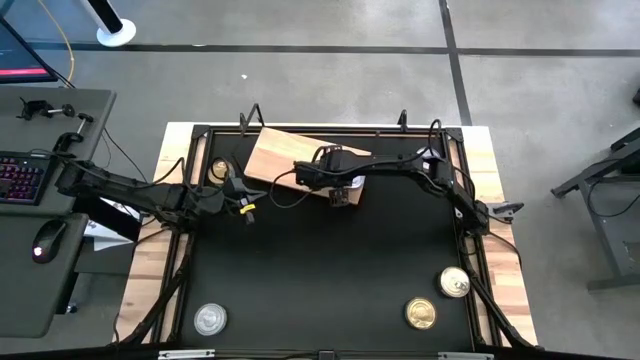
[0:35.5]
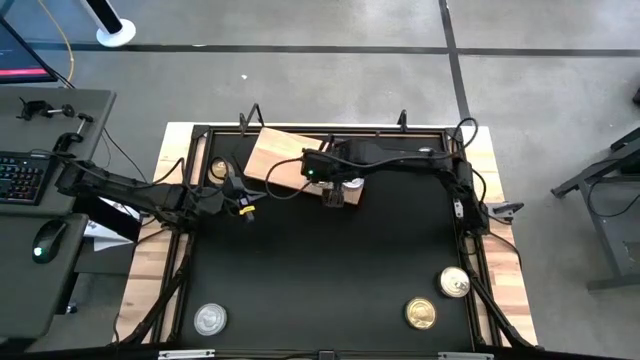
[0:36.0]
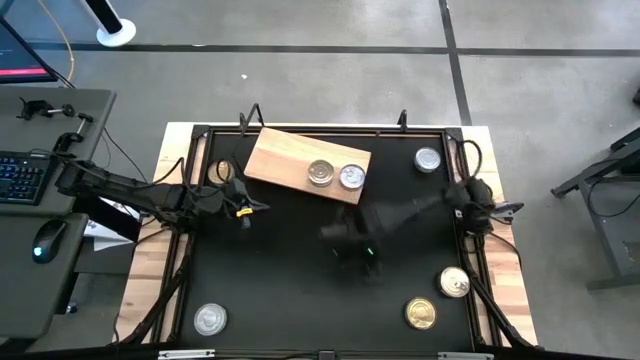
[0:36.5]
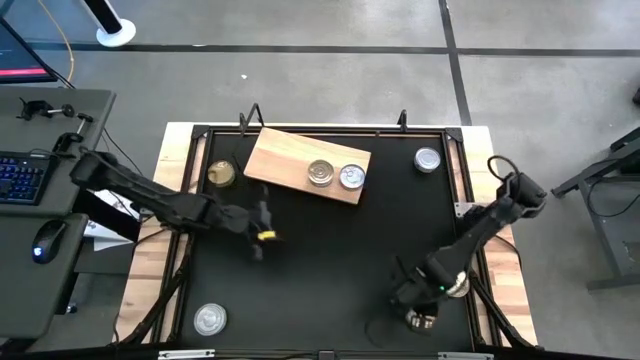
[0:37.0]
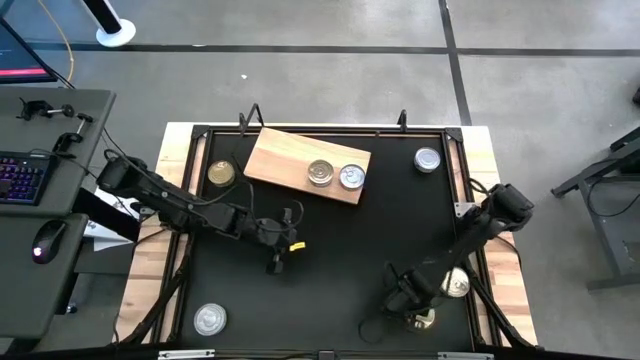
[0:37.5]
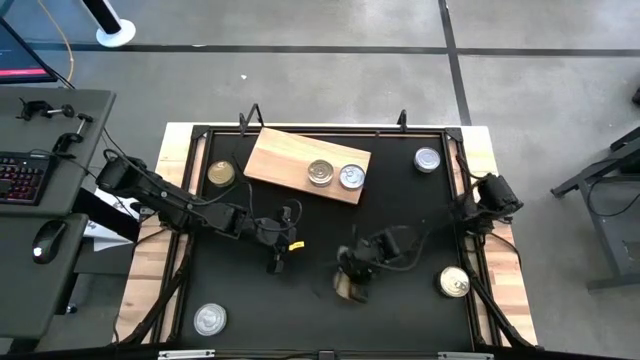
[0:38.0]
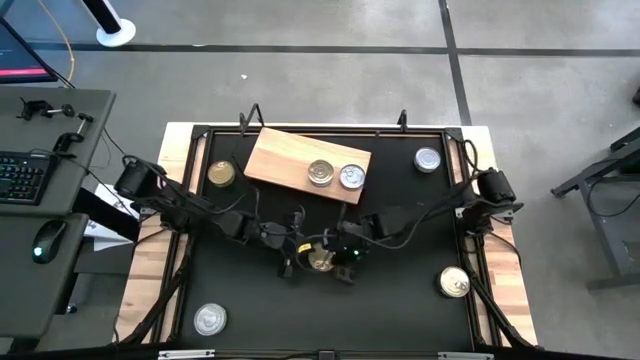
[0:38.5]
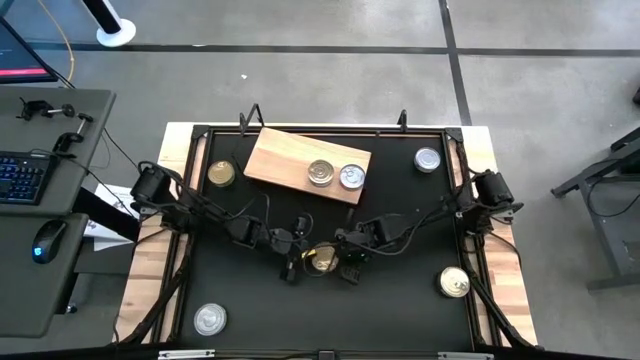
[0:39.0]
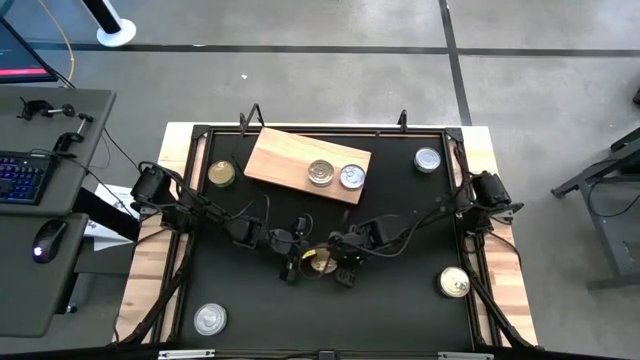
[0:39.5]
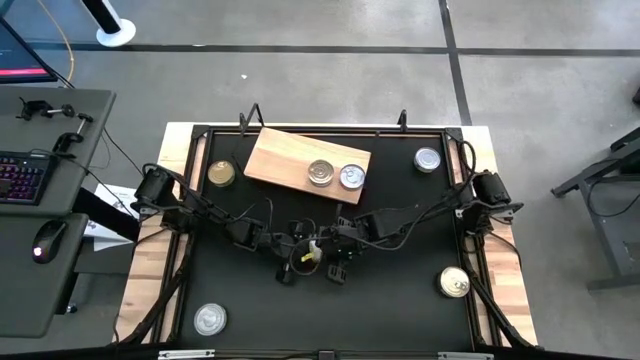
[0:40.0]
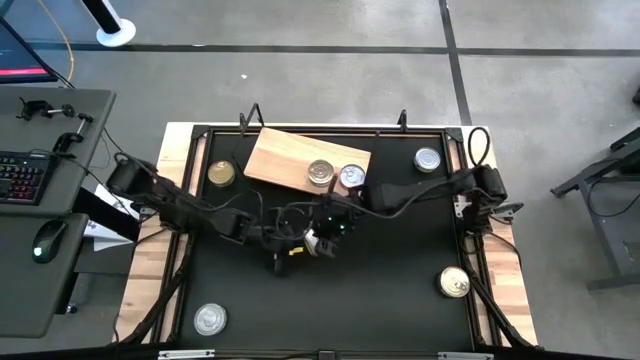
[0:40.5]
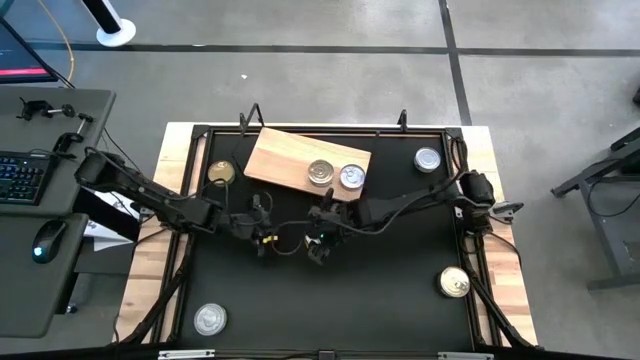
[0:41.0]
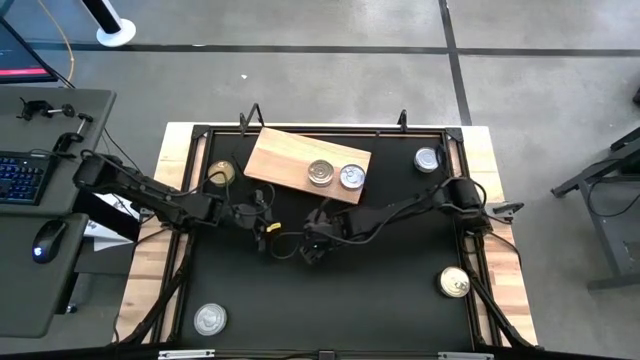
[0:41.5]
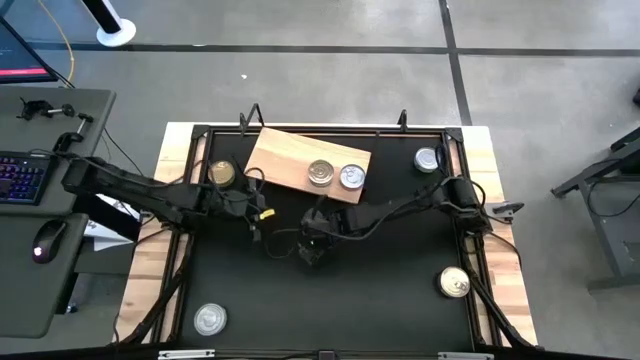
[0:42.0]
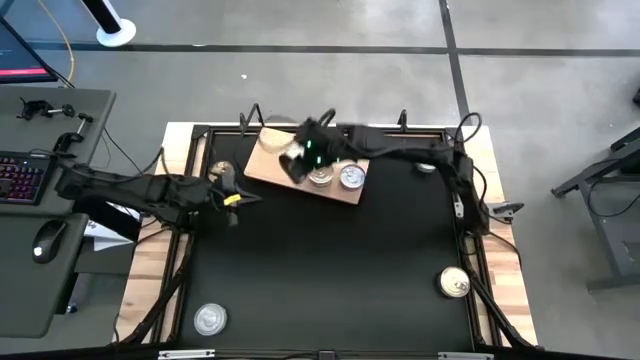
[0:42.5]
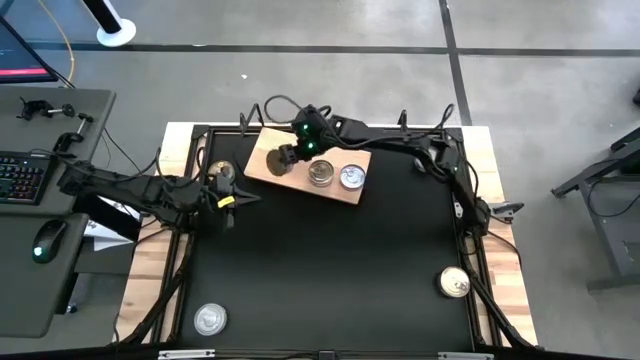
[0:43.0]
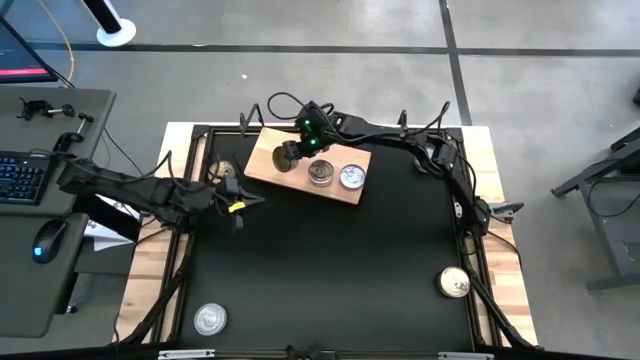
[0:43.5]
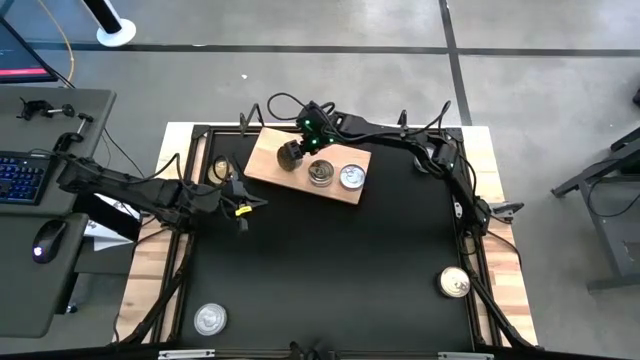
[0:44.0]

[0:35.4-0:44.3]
Task: Stack canned seafood by type on shelf
Put the bottom right green tuna can on the shelf

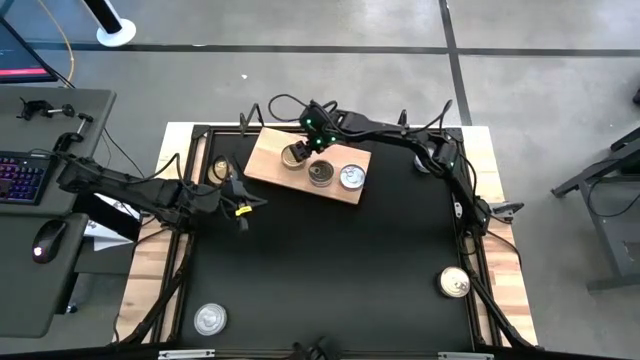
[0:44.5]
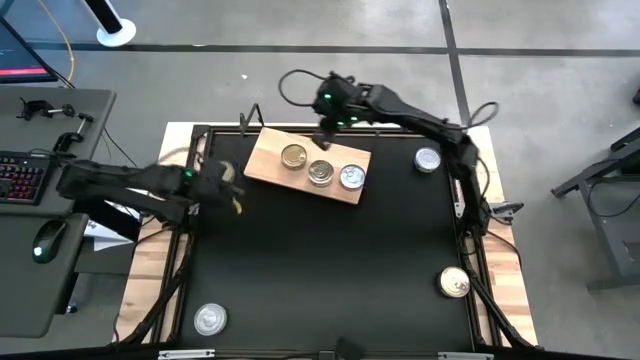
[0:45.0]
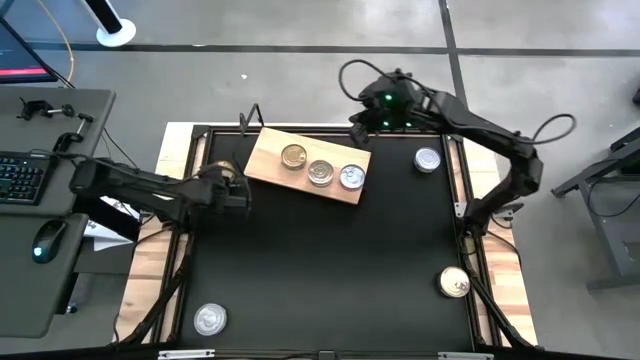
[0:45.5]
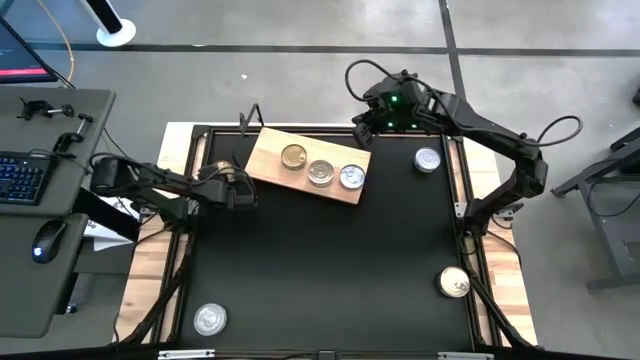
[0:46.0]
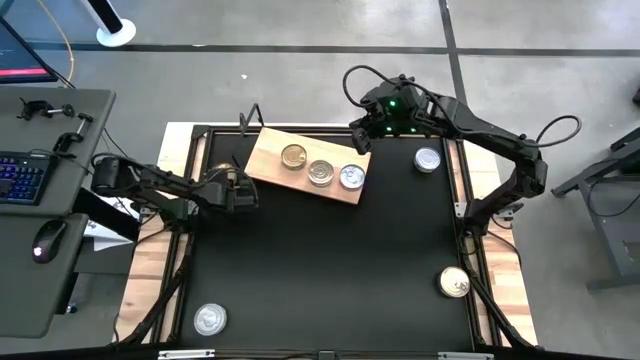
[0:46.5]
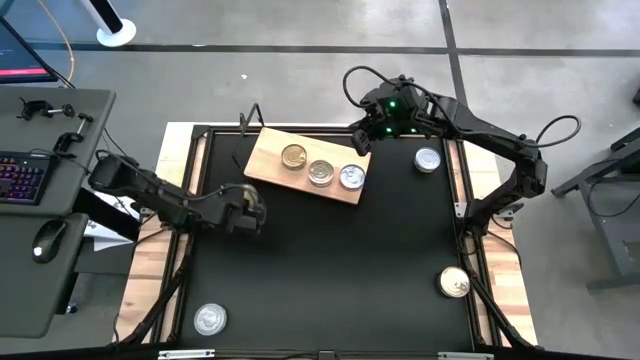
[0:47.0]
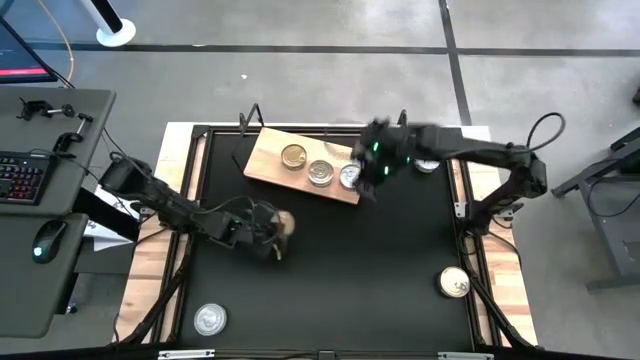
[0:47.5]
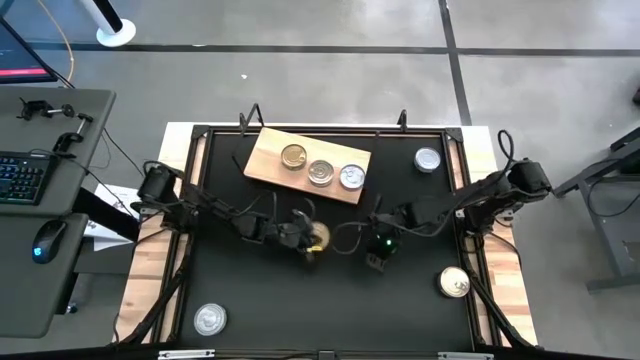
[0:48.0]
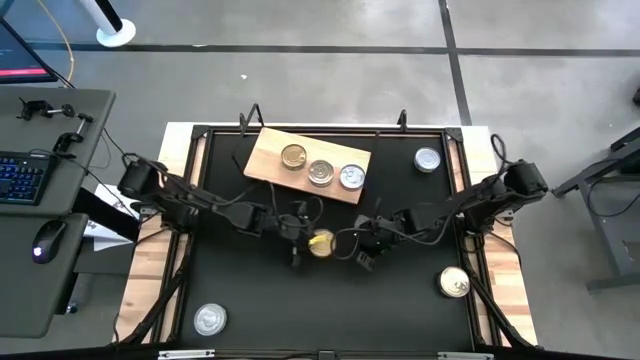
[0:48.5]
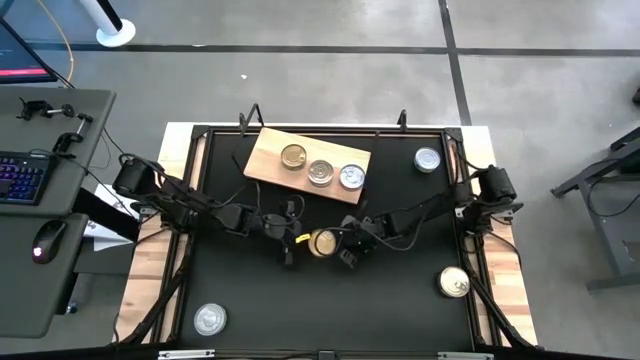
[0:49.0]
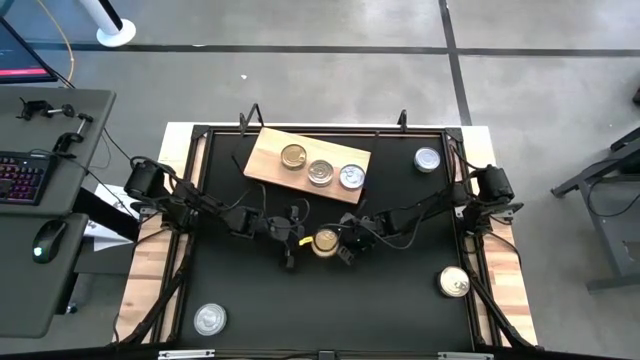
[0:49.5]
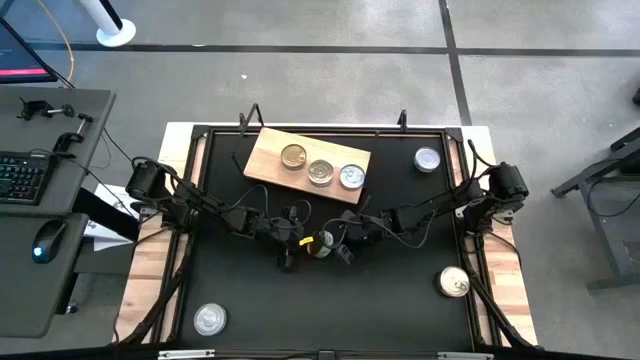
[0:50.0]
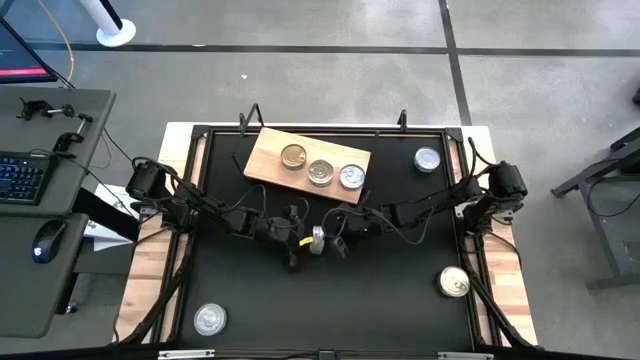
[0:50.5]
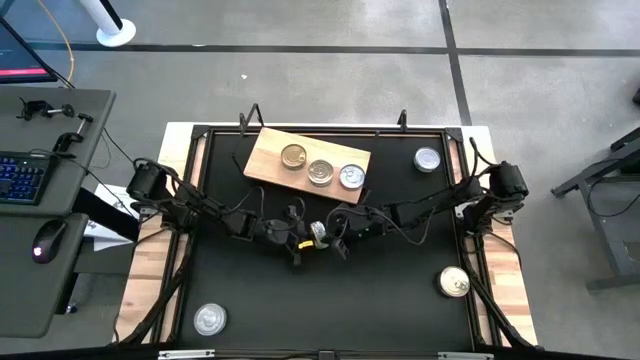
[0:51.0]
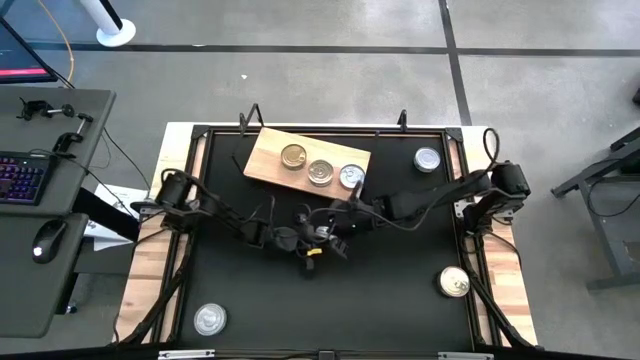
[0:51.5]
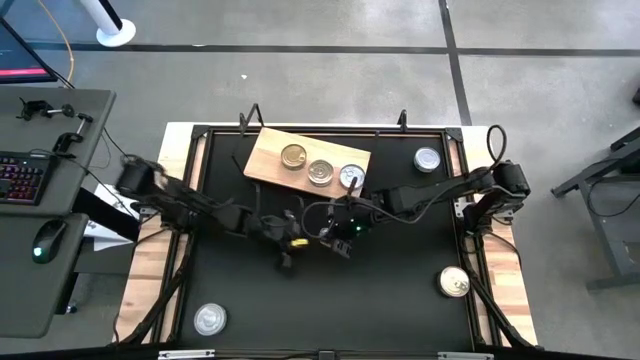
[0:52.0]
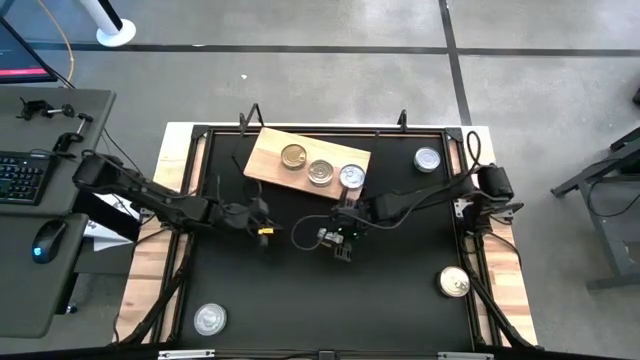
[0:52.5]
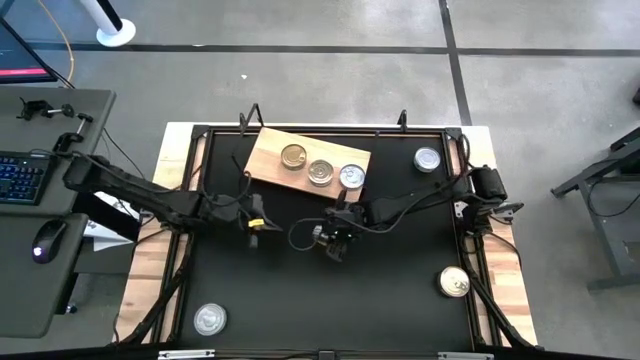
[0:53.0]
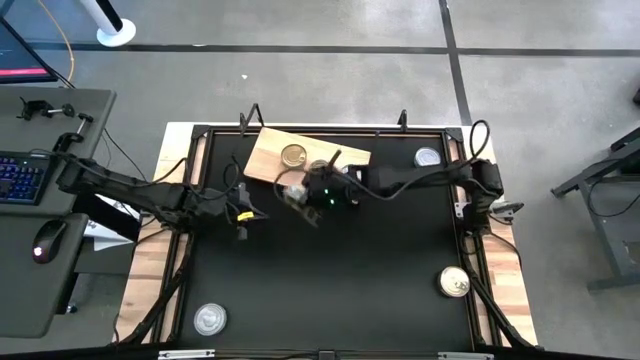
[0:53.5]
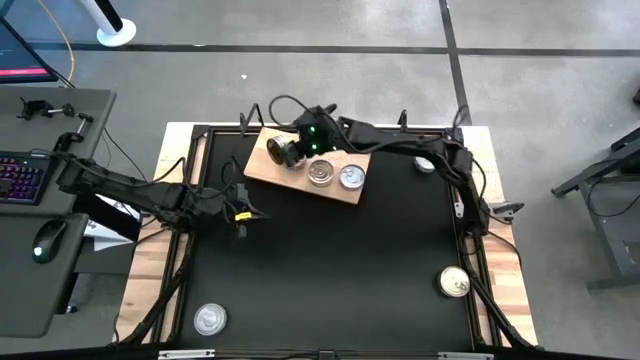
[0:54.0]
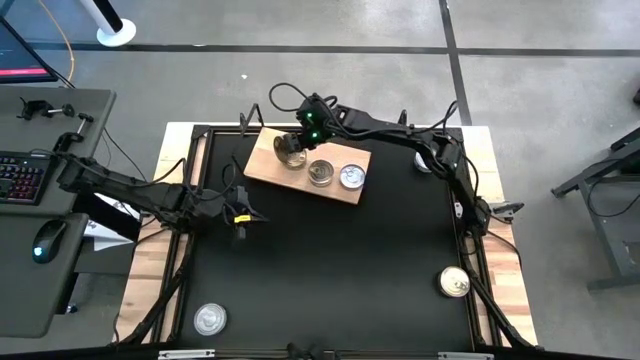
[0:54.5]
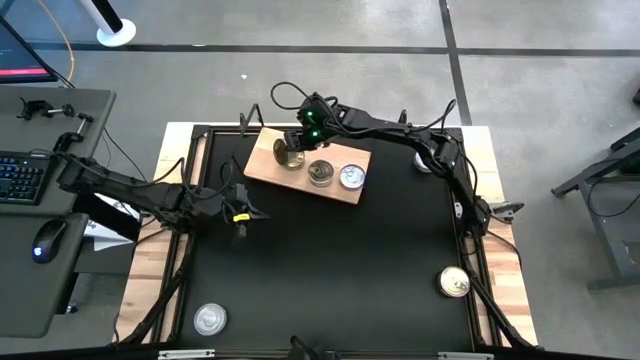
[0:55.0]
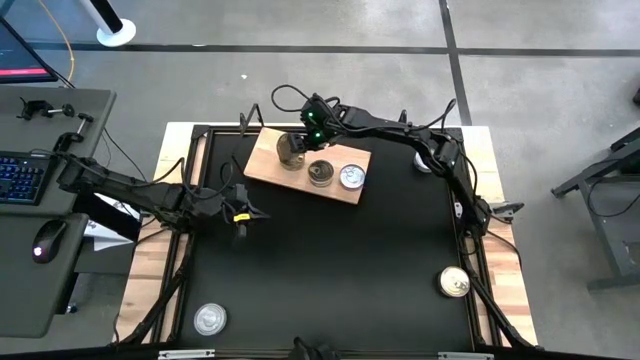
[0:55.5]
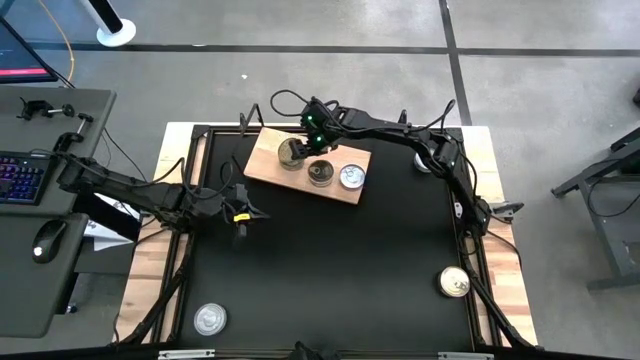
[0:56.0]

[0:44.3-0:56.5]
Stack the top left green tuna can on top of the other green tuna can on the shelf
